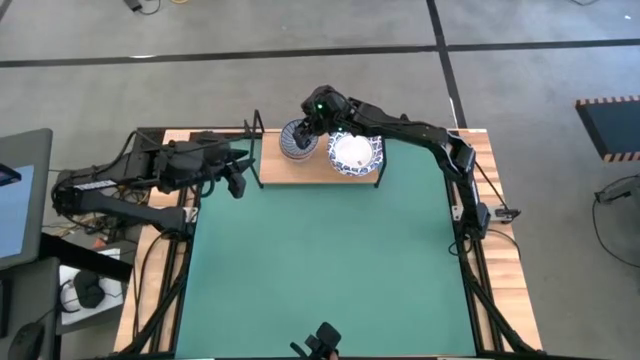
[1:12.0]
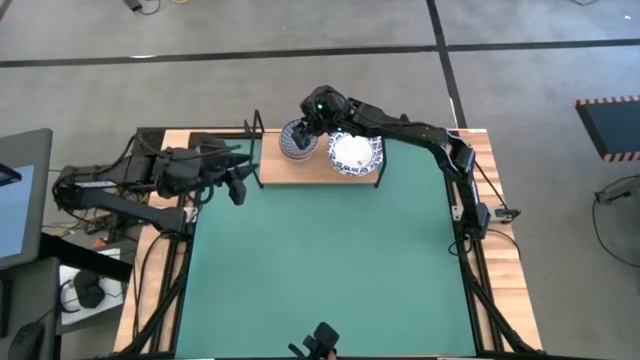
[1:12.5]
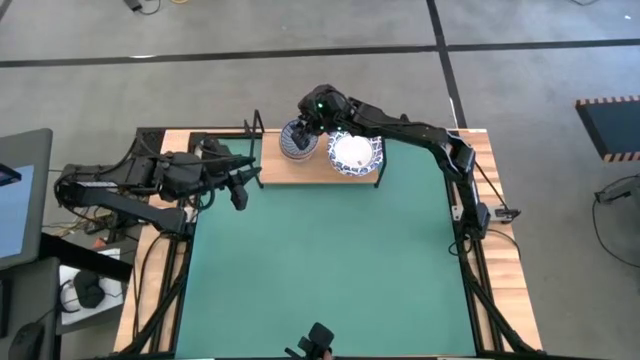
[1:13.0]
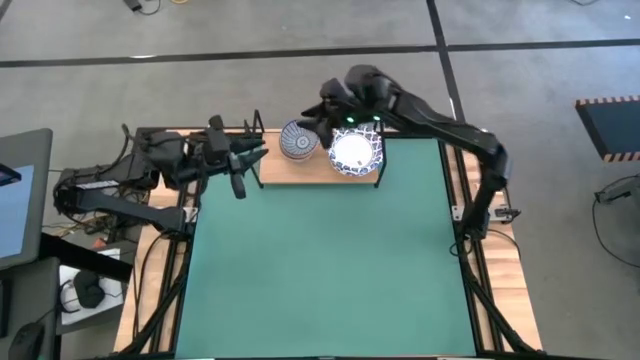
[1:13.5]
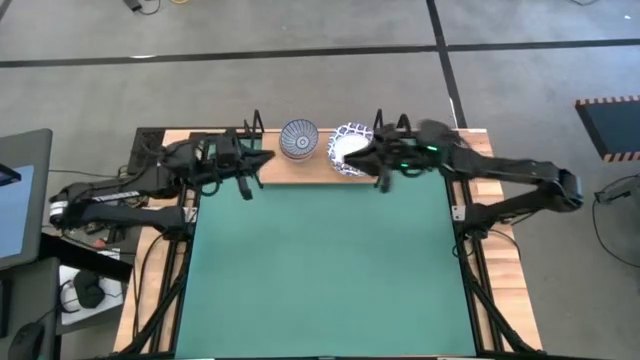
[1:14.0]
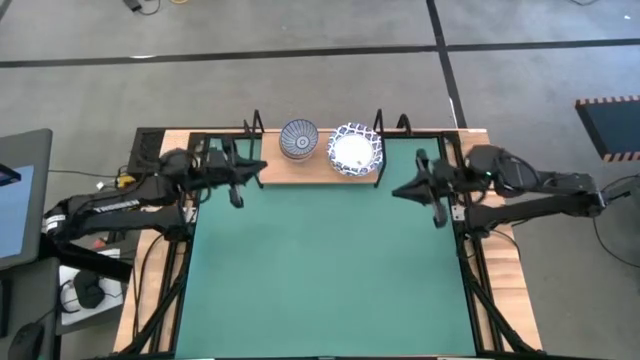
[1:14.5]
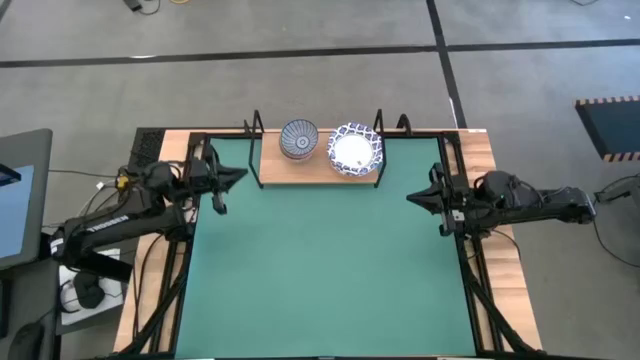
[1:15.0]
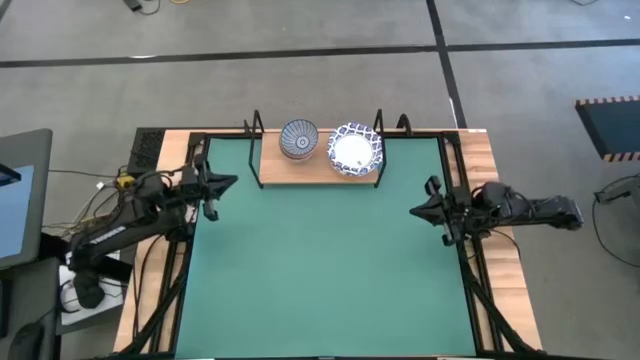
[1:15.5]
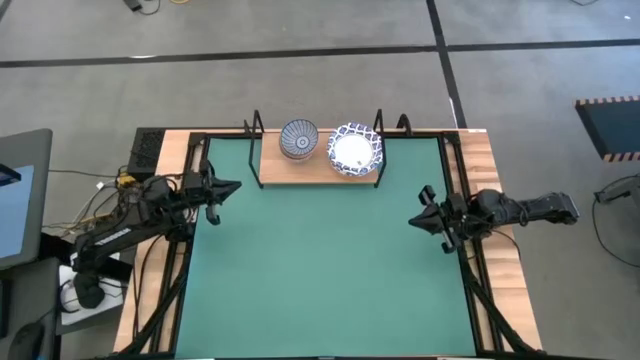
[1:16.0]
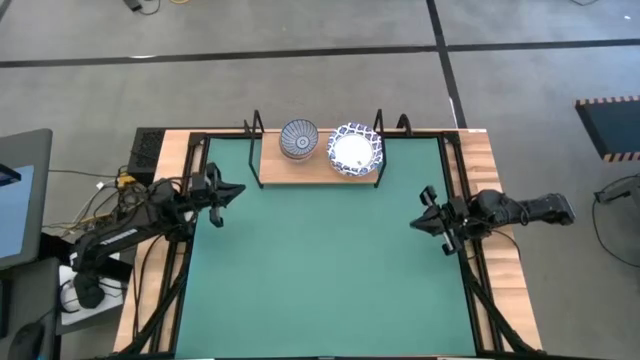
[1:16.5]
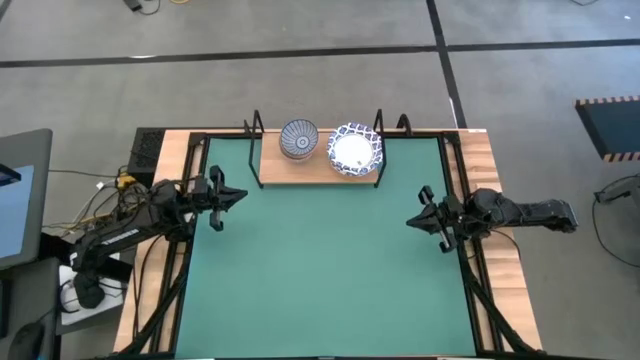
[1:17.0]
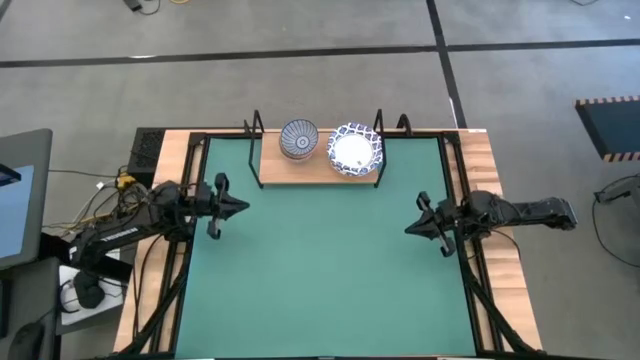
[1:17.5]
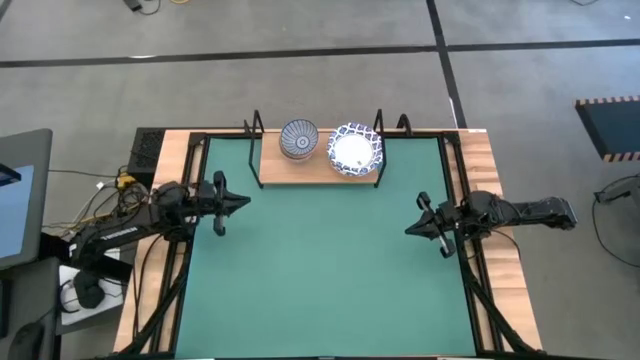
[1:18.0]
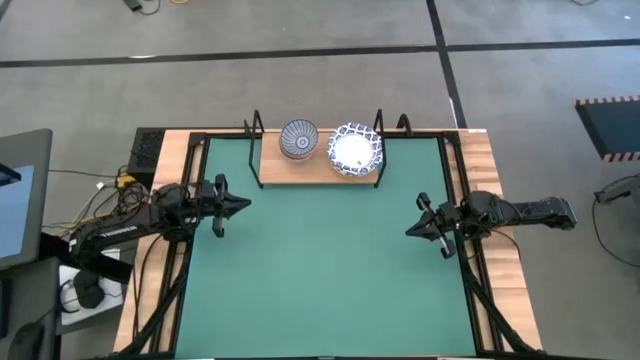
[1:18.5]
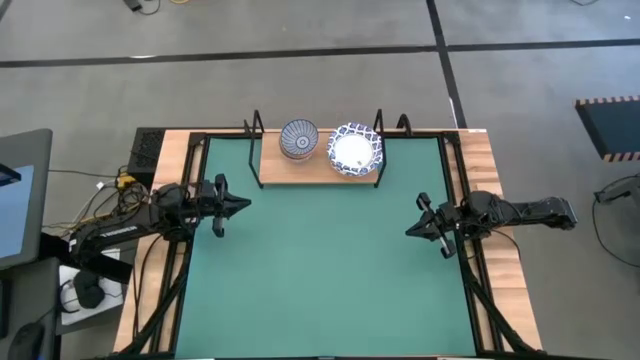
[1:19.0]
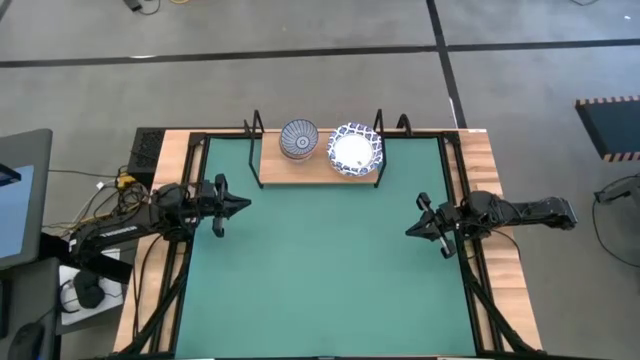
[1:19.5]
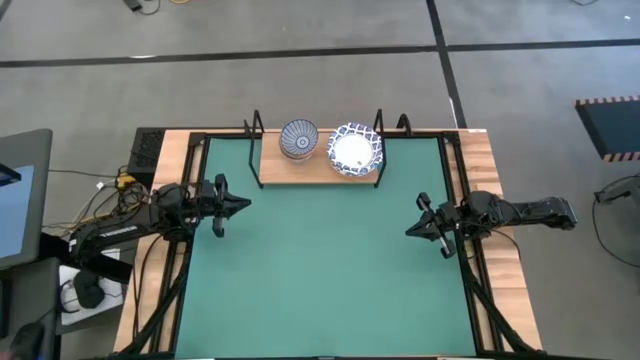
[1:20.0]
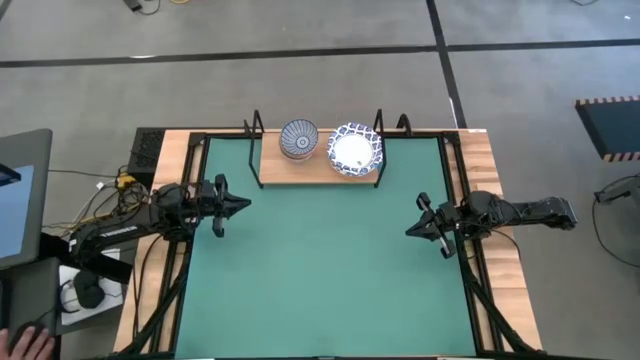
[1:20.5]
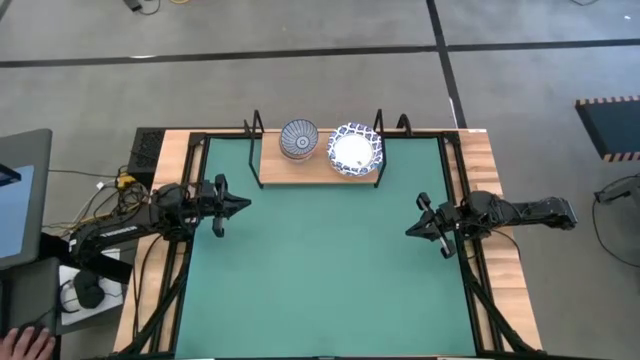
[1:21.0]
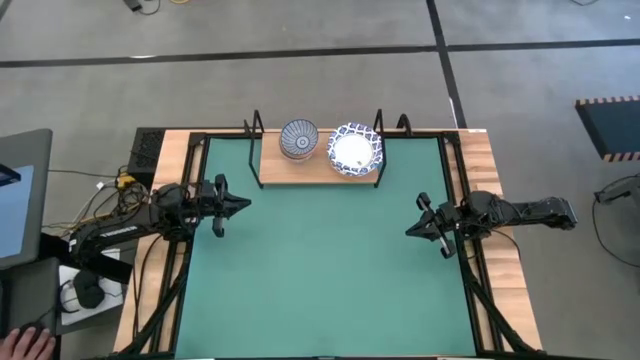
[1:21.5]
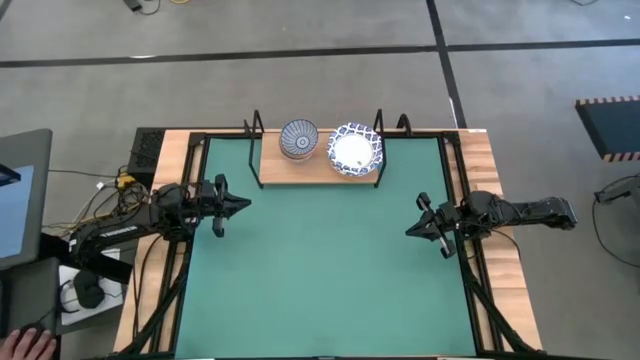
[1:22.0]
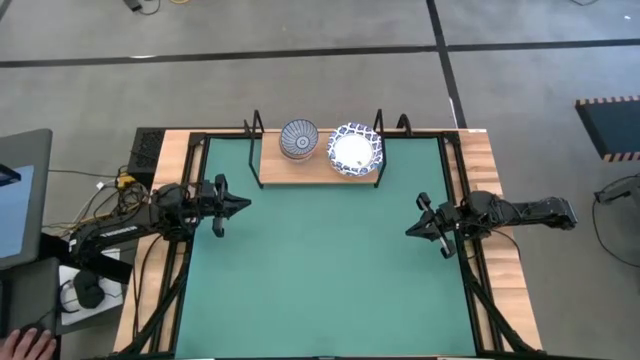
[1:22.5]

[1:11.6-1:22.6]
Task: Place and stack bowls onto a shelf
Return to Home Position

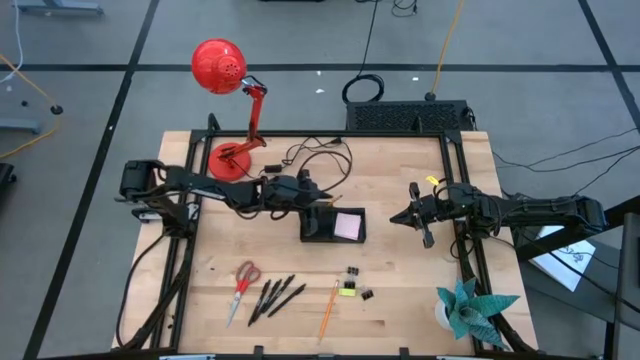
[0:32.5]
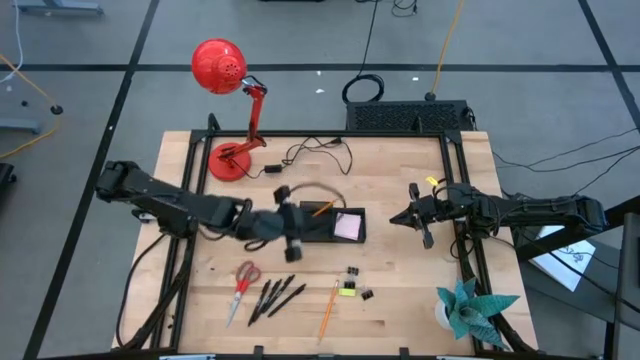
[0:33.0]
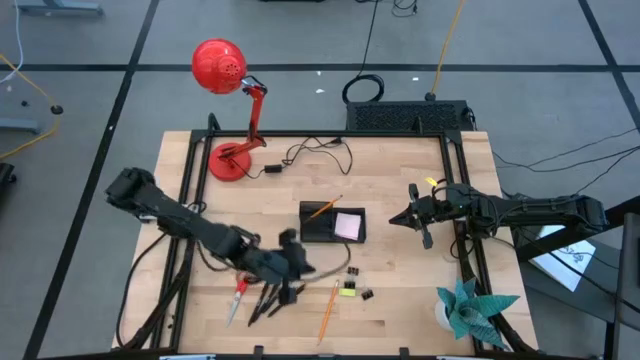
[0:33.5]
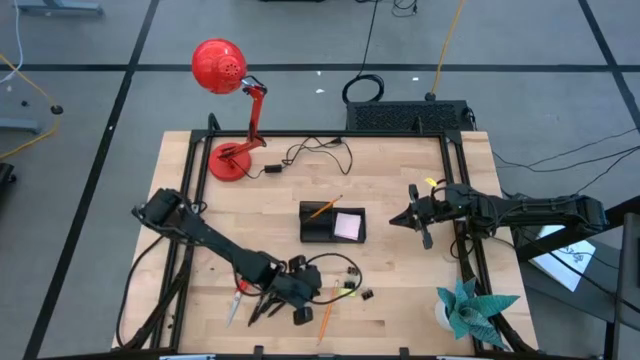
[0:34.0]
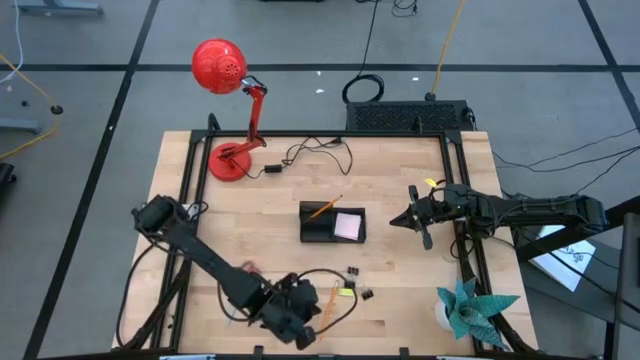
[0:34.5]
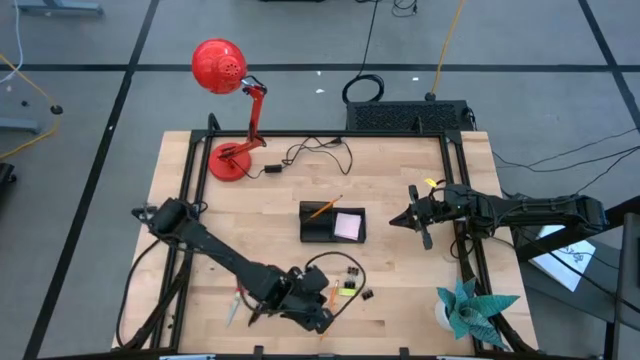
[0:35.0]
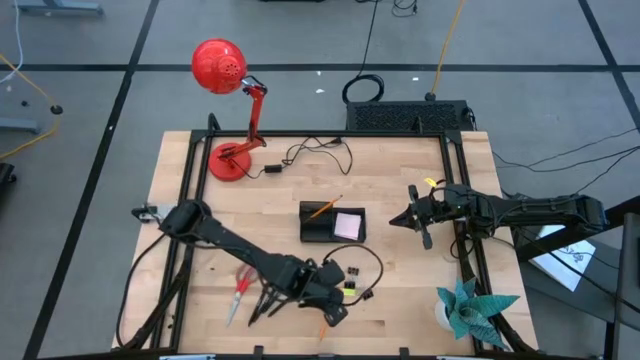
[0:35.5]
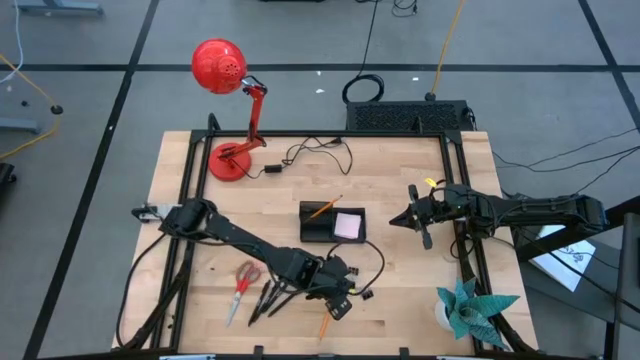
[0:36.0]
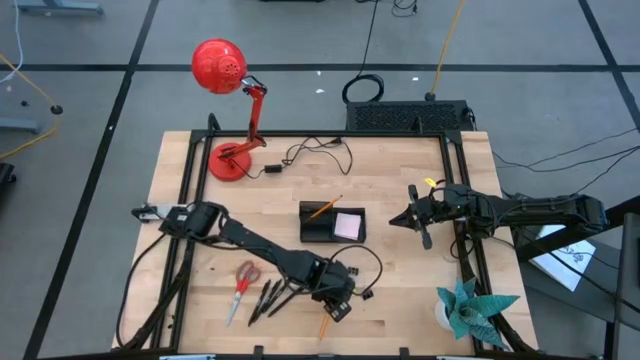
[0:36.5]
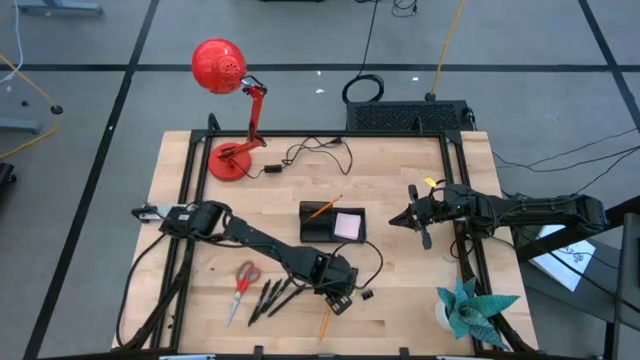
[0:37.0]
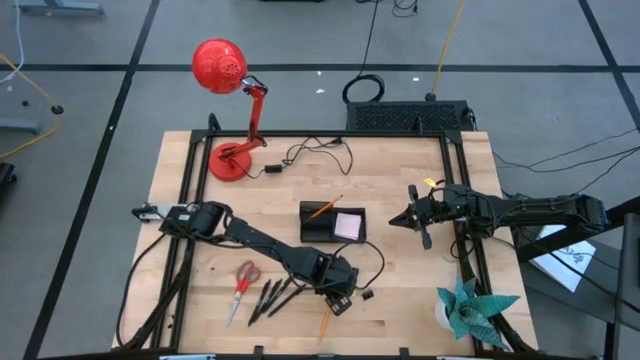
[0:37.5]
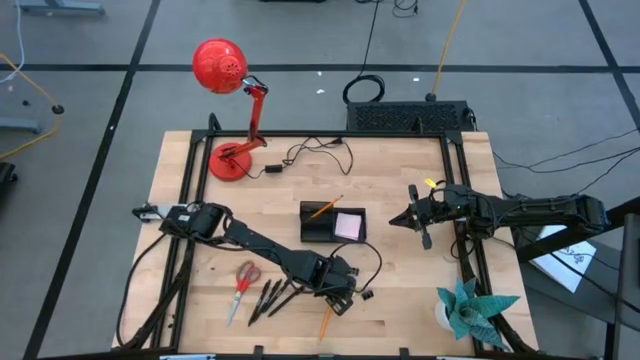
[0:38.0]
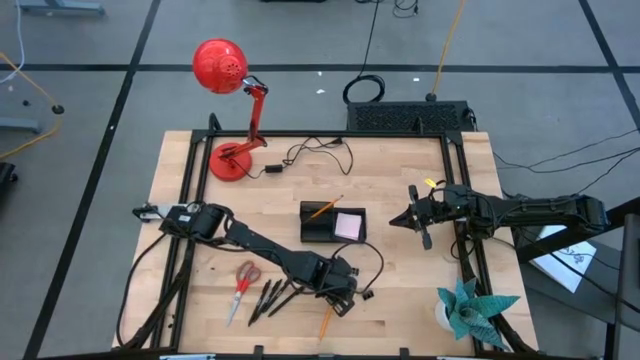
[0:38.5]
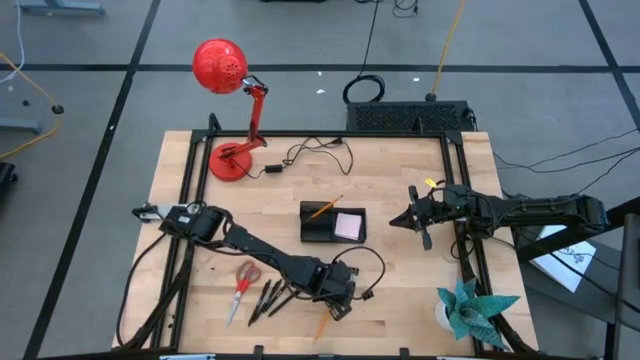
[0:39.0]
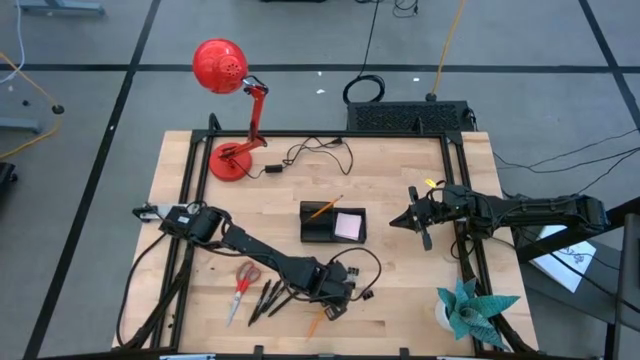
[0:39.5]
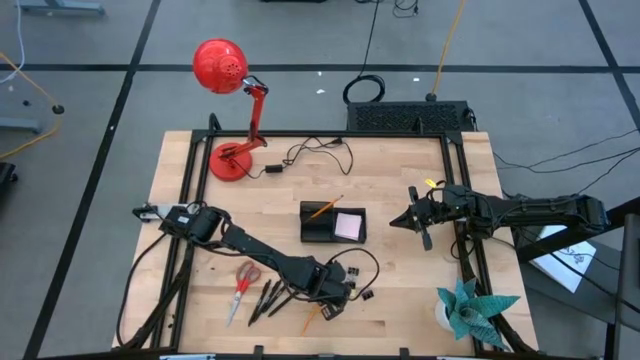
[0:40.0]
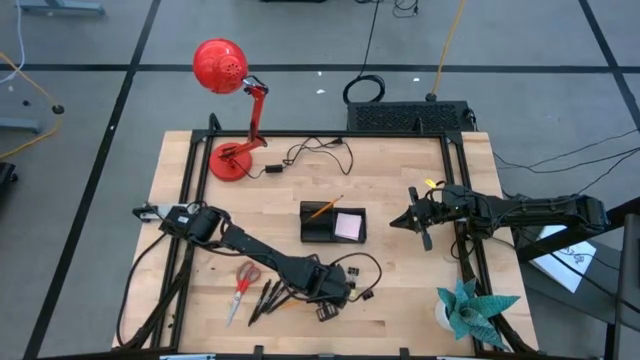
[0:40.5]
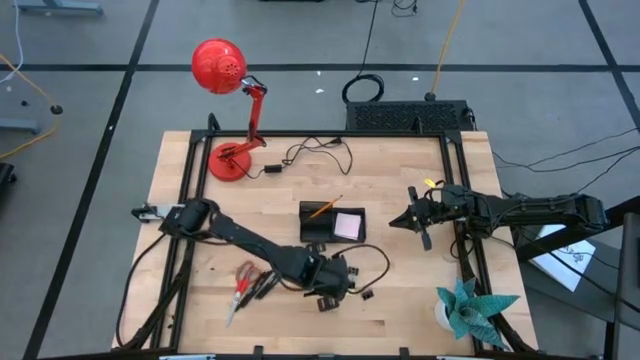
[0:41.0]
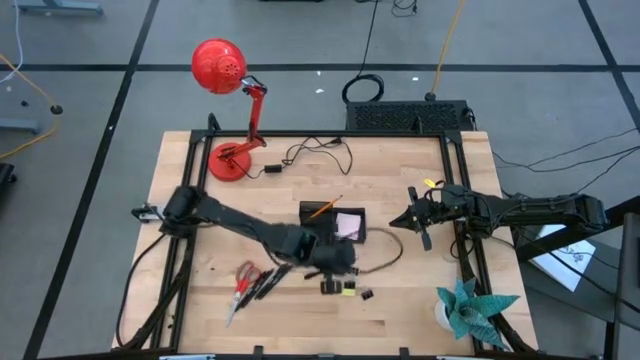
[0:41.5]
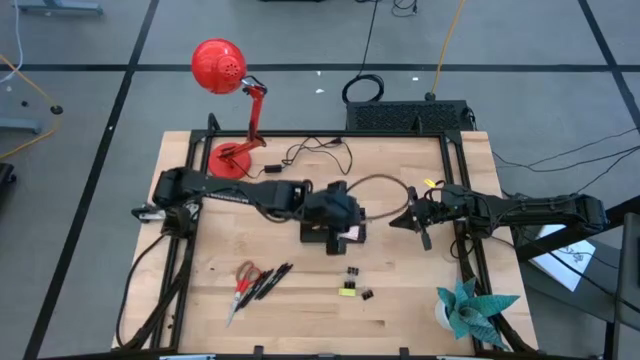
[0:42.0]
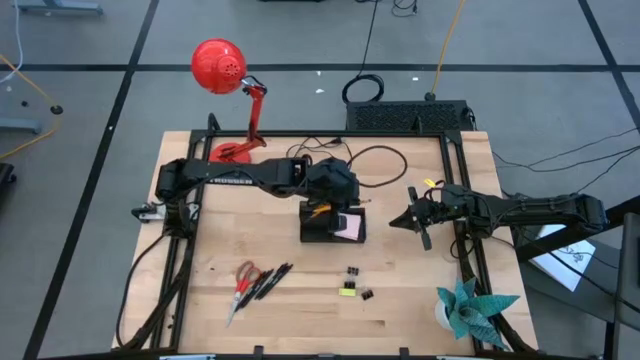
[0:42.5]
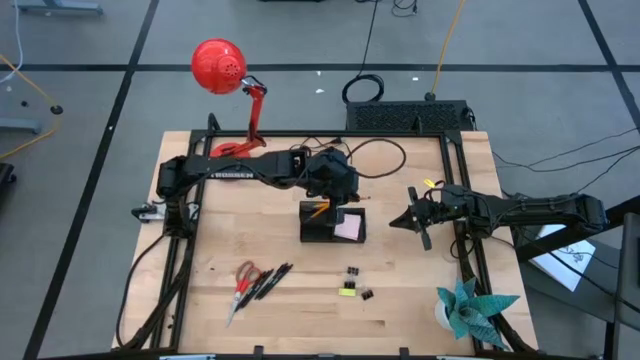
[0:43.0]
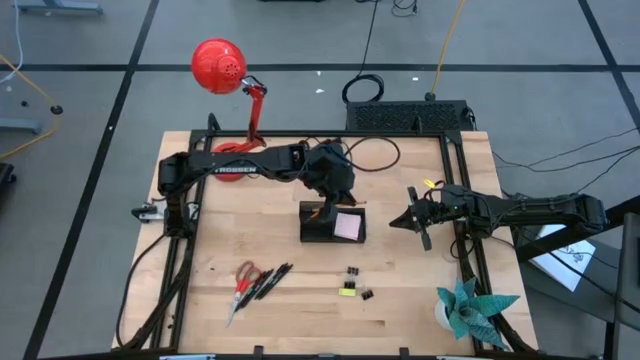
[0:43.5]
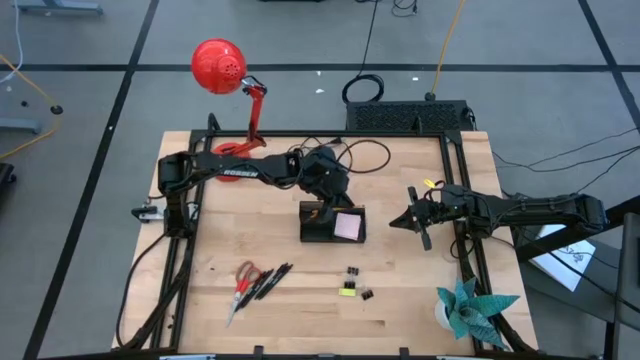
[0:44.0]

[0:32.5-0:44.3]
Task: Pick and place office supplies into organizer
Put the pencil into the desk organizer
